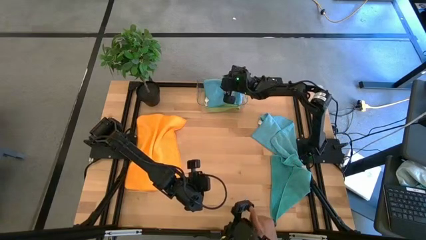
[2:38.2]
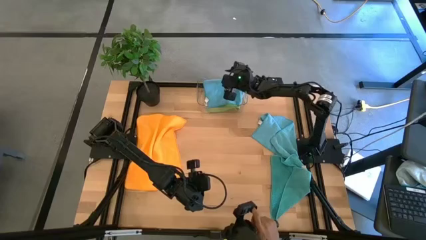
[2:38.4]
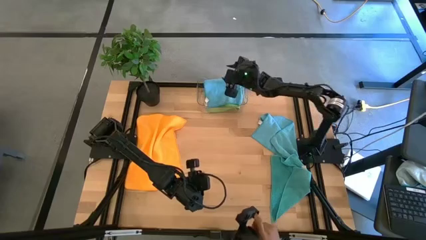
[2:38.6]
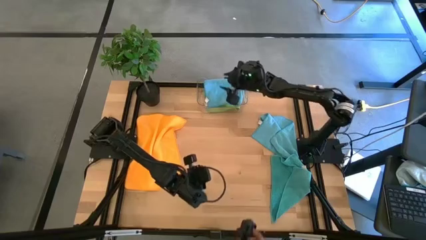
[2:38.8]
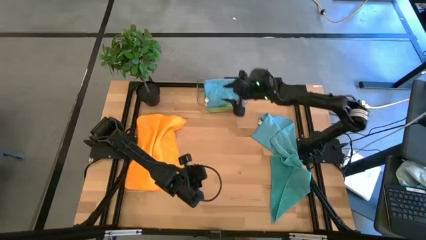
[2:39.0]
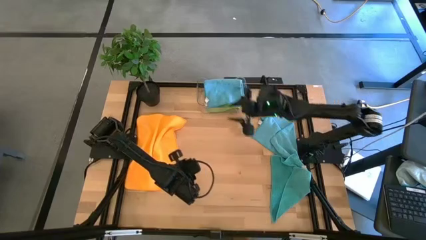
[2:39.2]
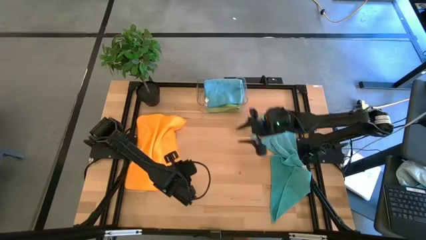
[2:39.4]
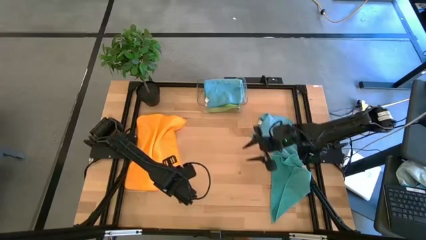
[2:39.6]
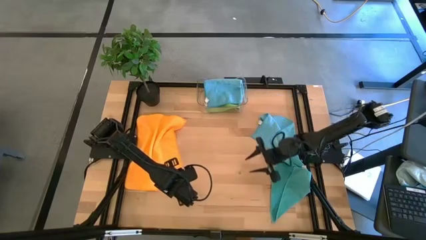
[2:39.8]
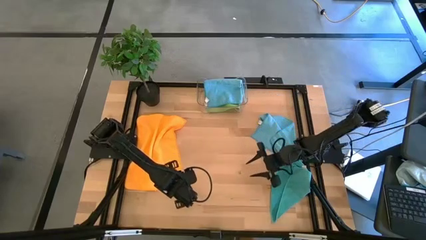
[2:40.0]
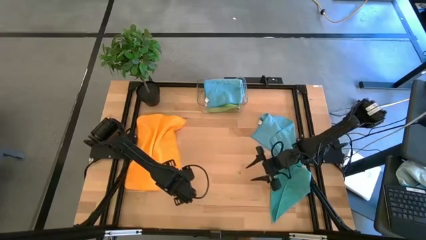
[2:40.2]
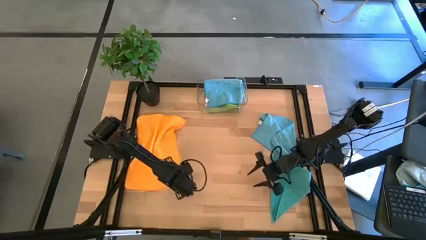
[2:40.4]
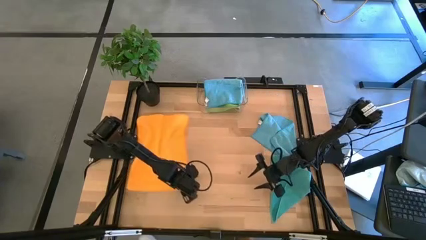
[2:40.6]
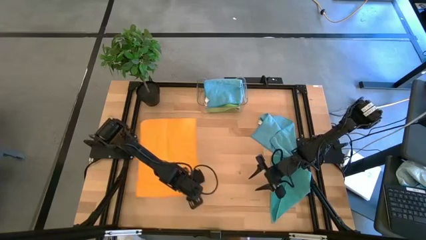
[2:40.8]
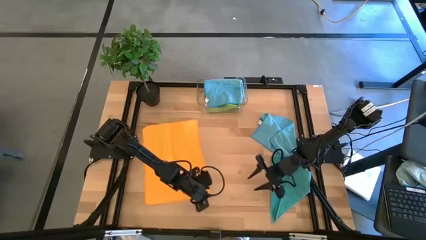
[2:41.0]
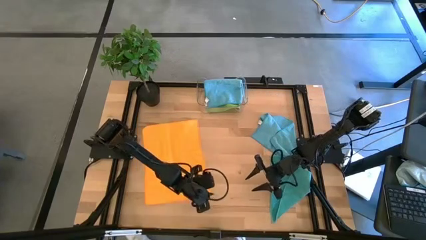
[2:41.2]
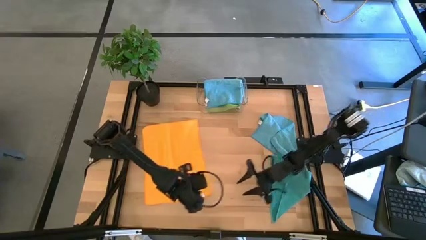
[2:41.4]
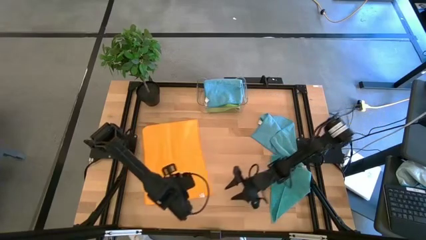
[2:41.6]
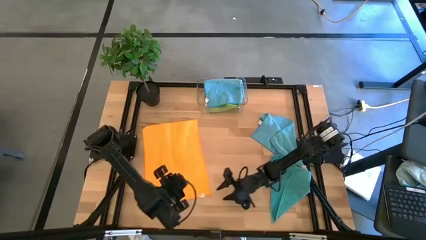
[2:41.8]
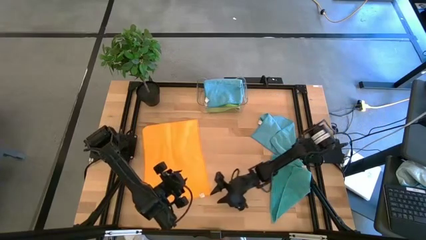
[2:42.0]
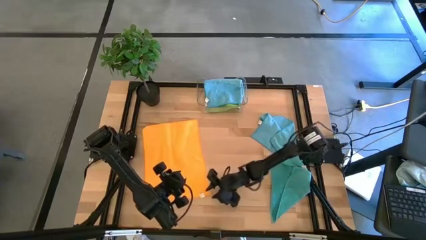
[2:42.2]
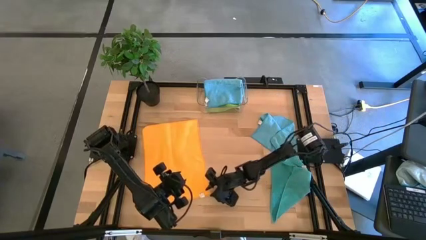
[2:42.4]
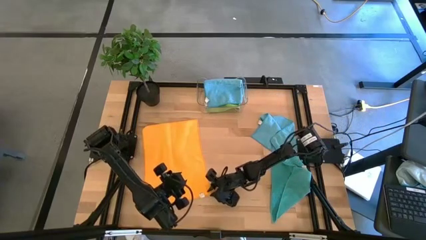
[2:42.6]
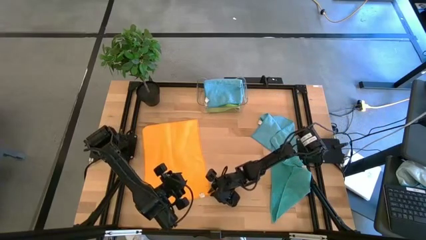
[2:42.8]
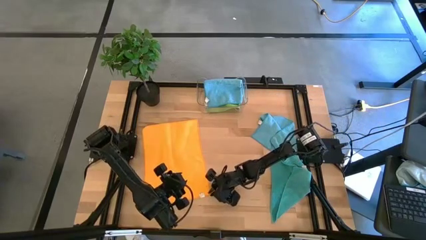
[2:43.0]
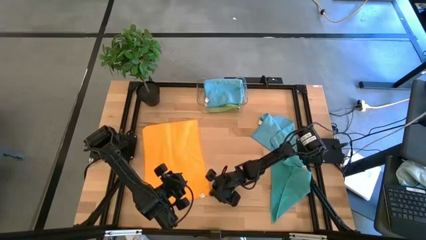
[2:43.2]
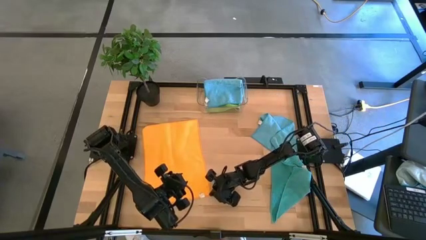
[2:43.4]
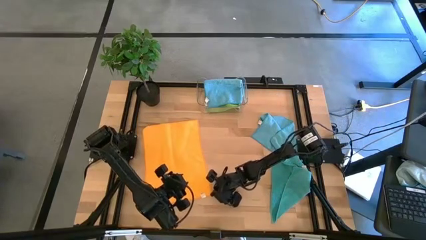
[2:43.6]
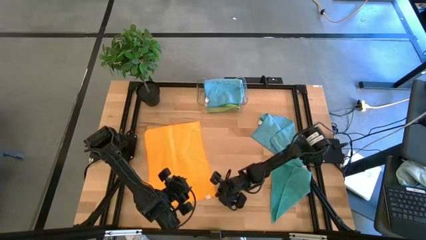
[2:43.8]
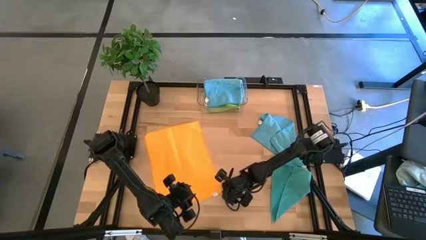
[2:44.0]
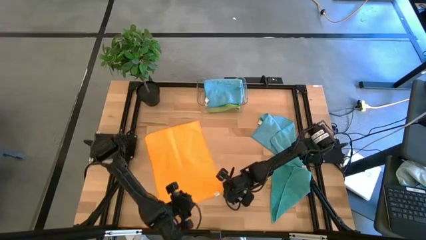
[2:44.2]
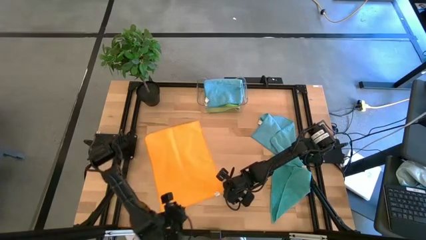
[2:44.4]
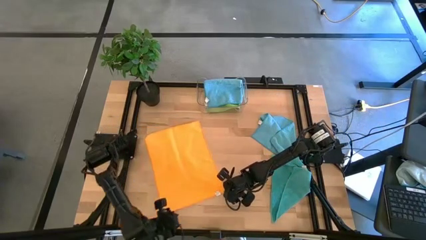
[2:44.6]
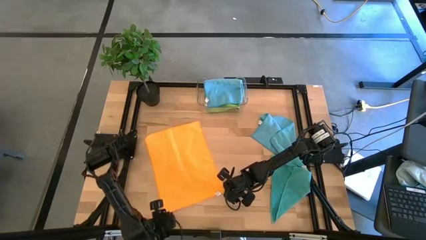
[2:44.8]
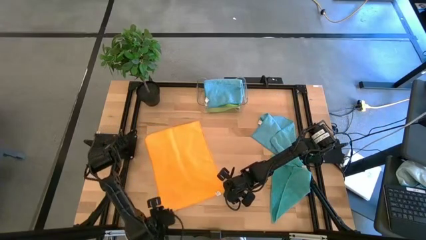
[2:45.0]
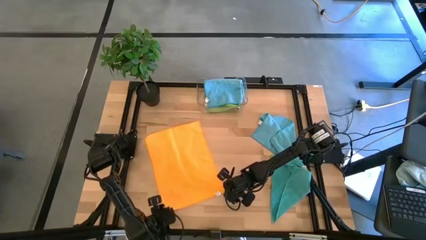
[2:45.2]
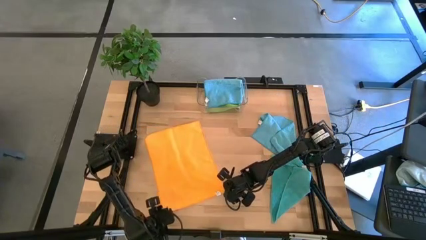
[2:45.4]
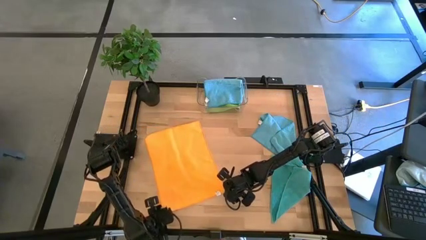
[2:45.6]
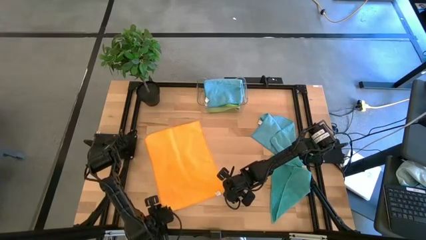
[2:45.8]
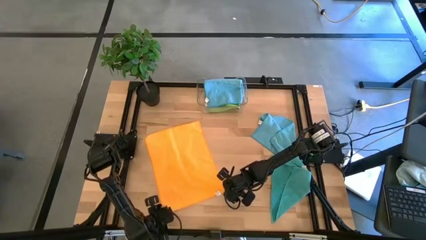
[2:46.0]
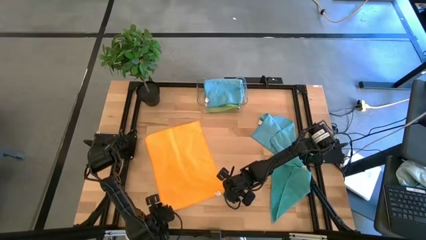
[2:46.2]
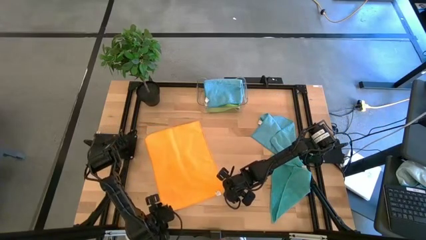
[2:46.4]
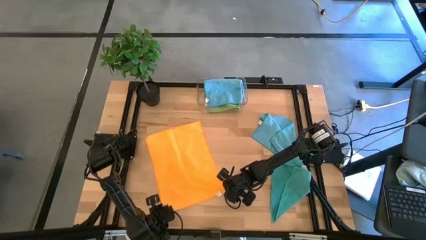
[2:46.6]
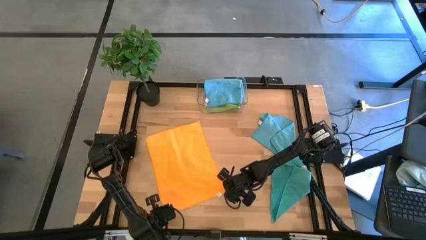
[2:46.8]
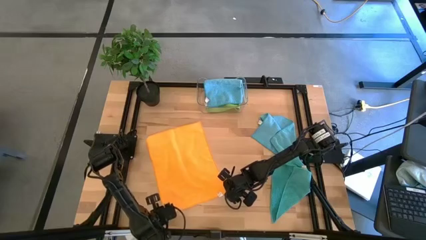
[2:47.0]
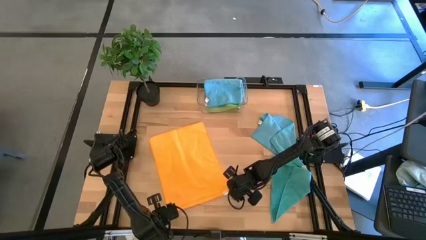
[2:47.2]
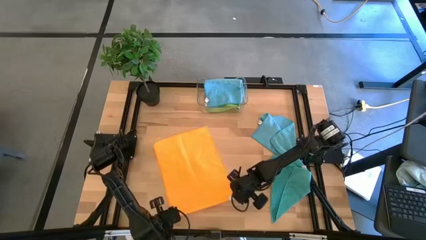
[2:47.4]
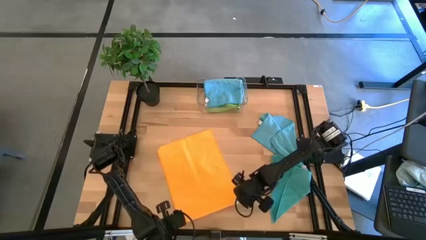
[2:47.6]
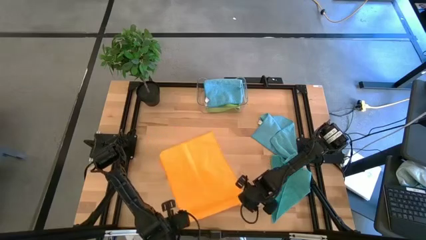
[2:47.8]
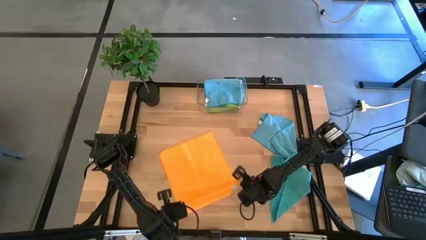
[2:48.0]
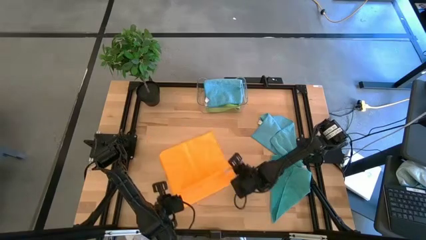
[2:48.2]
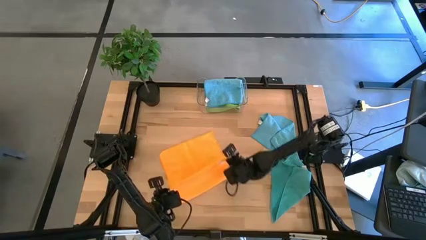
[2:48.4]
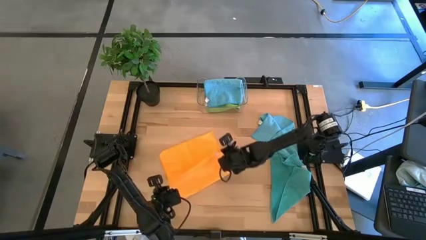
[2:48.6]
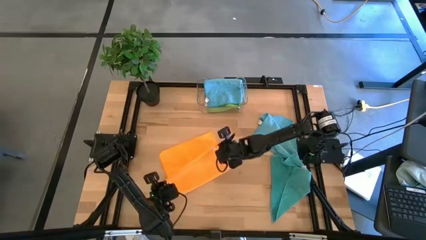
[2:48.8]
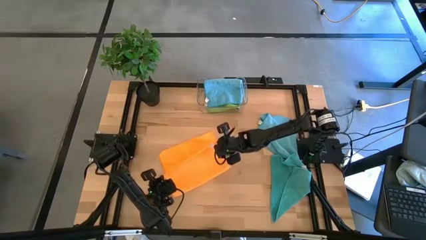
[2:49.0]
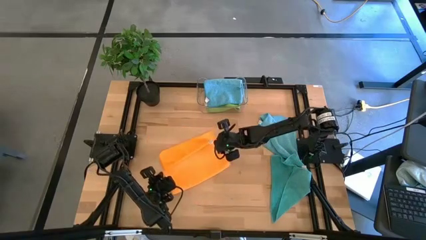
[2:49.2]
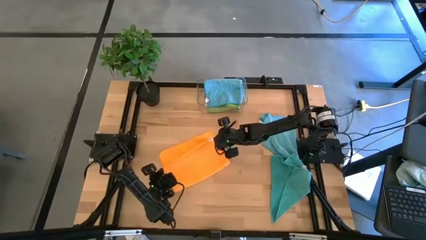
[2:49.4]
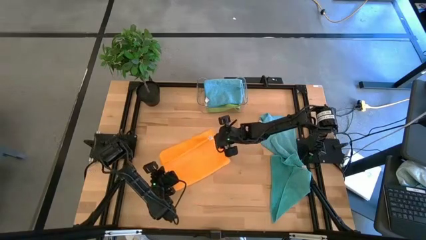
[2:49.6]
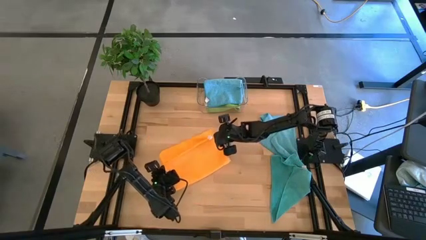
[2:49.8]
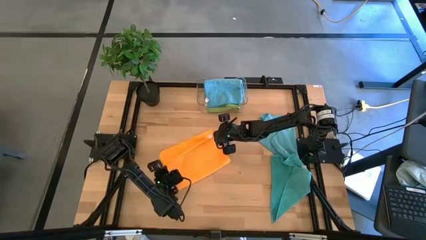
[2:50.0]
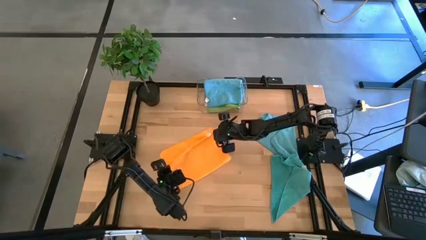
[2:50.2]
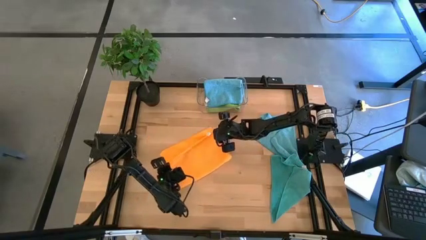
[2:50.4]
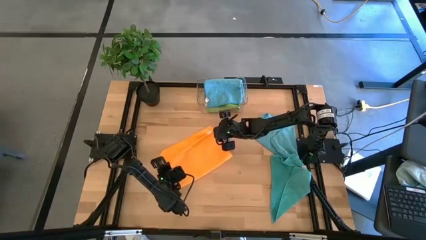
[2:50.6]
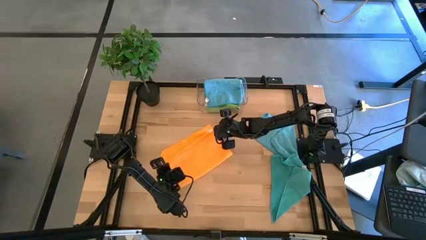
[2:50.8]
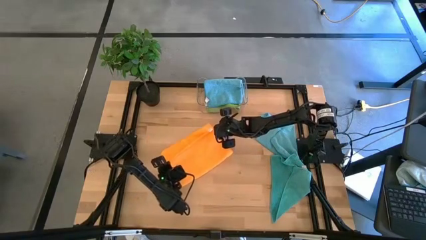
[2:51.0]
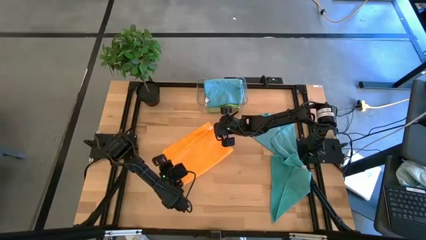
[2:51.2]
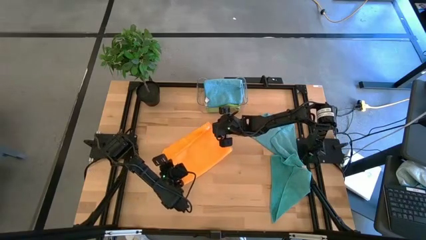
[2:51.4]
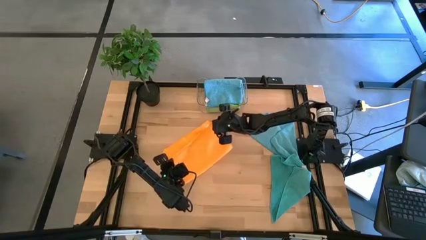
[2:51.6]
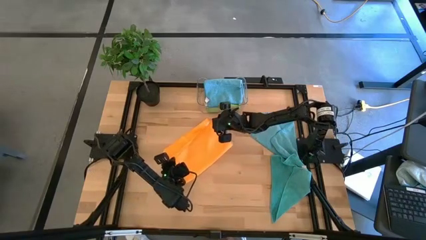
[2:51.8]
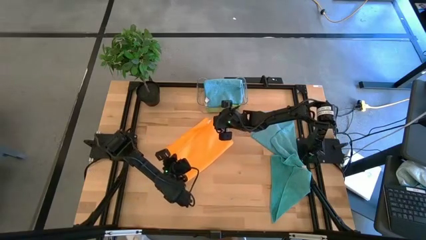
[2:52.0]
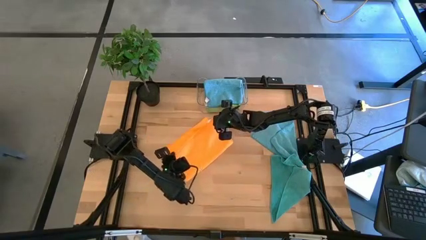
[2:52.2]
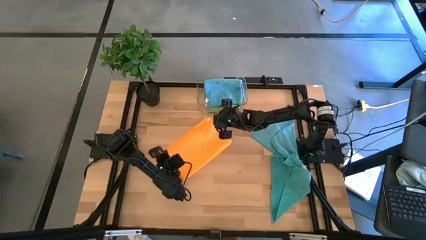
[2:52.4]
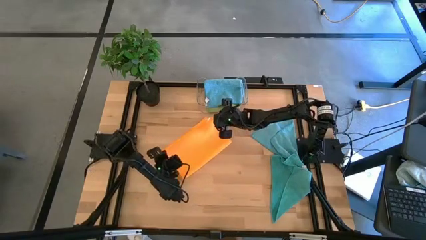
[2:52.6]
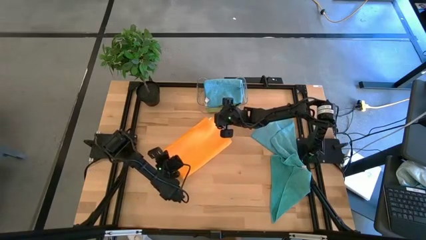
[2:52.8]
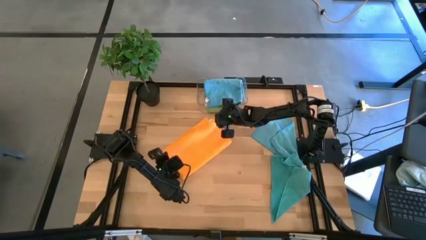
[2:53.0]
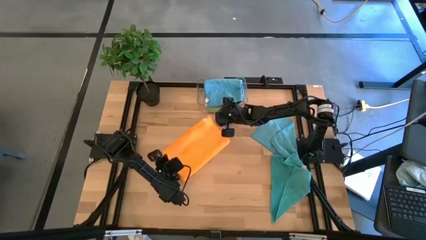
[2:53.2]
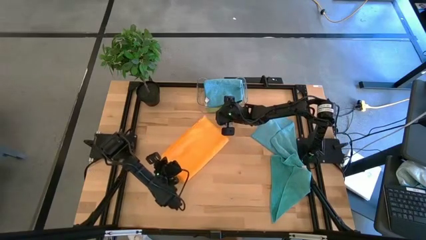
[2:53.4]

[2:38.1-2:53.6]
Task: Fold microfiber towels
Fold the orange microfiber towel

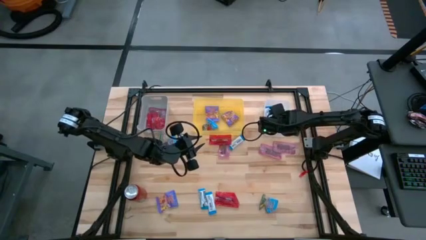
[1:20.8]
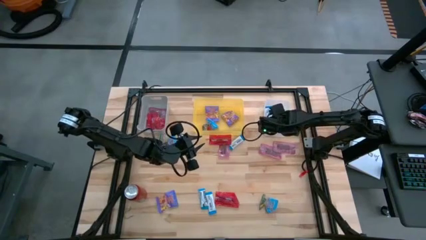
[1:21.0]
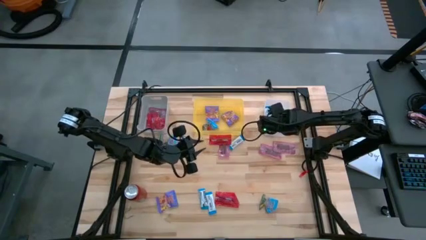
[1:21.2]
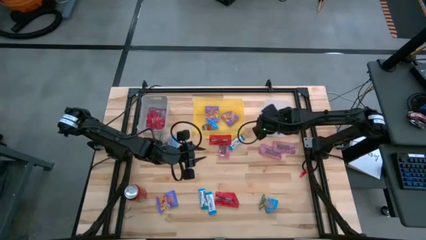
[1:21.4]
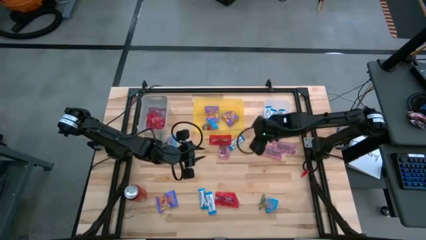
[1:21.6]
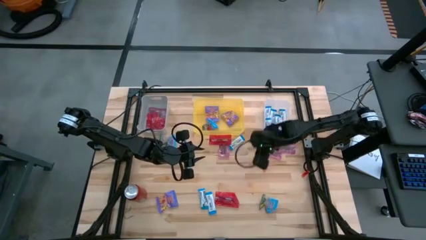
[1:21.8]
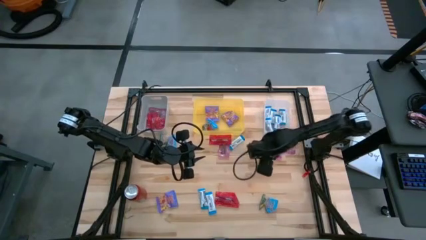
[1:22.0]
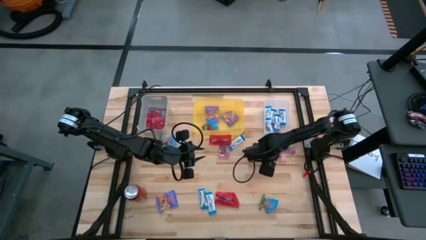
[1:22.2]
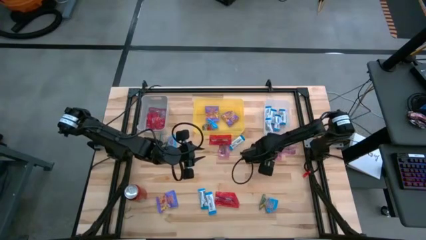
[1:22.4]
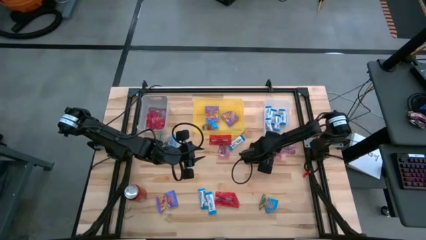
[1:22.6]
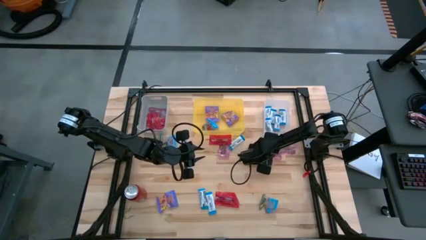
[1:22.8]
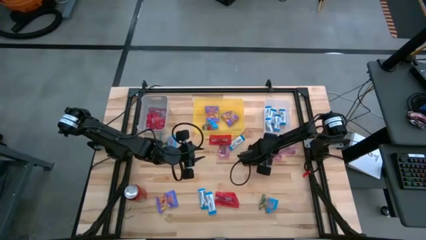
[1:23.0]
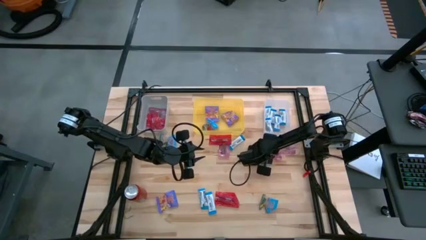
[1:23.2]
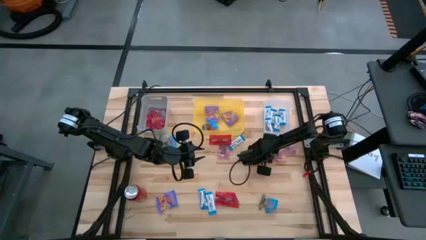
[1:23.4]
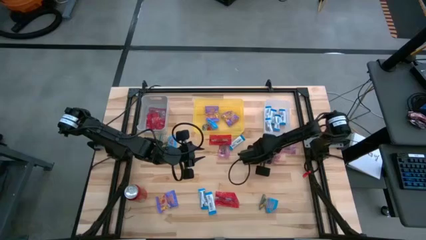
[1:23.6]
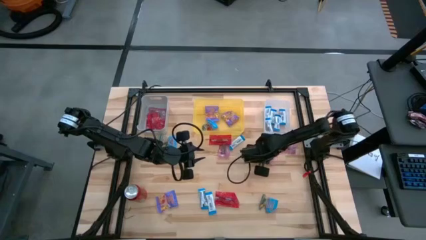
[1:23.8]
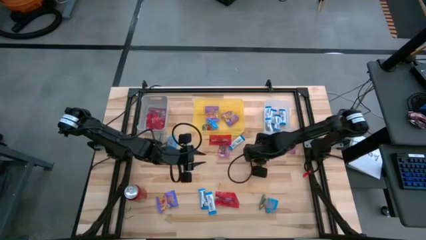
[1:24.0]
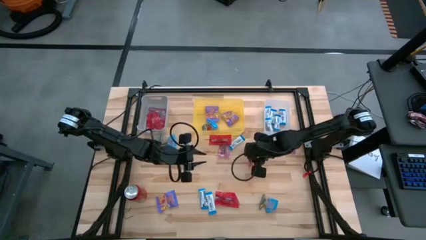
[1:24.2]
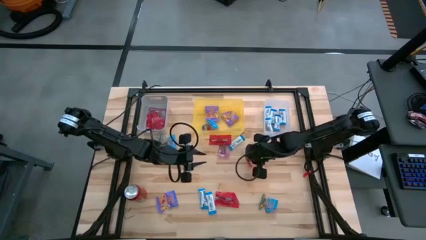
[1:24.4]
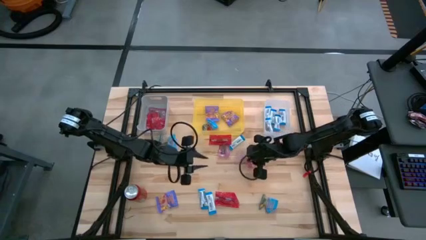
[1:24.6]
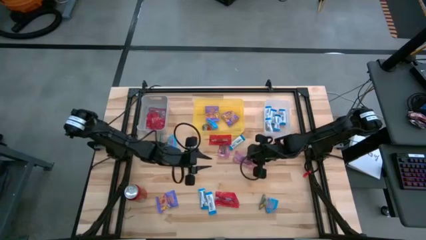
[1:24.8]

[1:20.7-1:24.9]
Task: Sort candy
Put the red gummy into the gray bin
